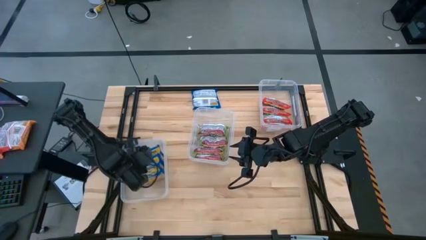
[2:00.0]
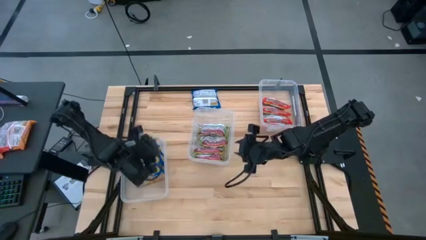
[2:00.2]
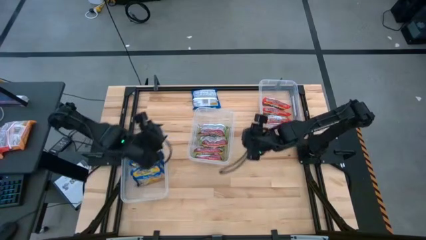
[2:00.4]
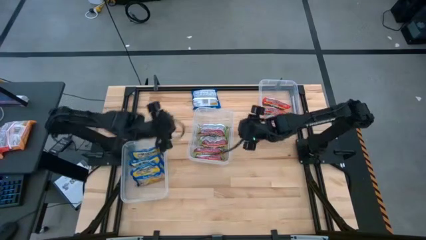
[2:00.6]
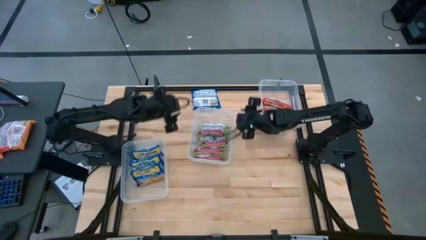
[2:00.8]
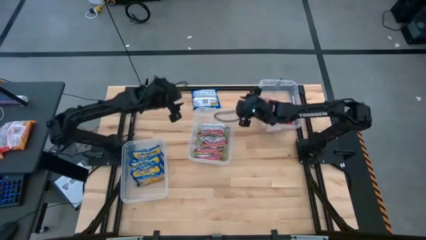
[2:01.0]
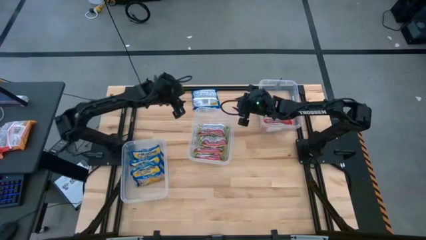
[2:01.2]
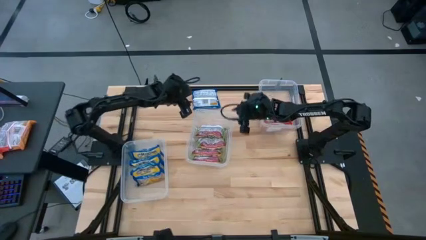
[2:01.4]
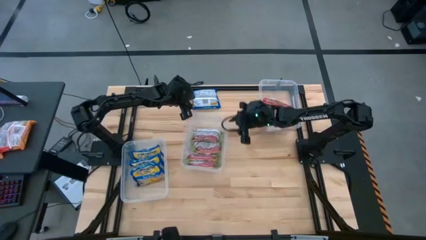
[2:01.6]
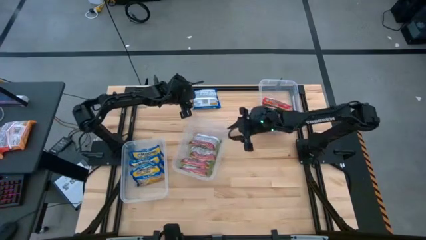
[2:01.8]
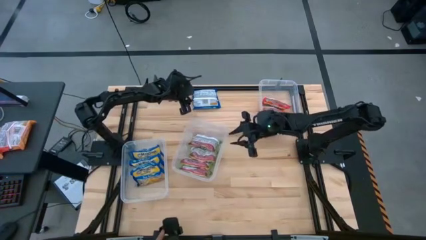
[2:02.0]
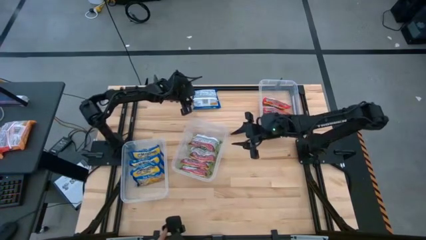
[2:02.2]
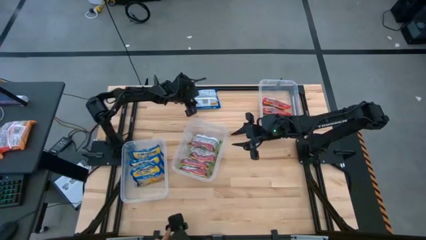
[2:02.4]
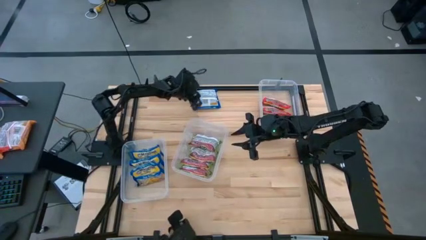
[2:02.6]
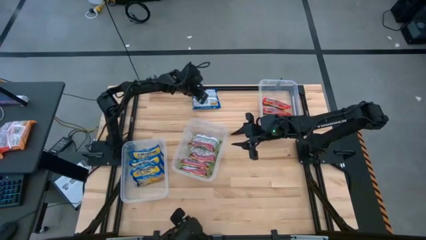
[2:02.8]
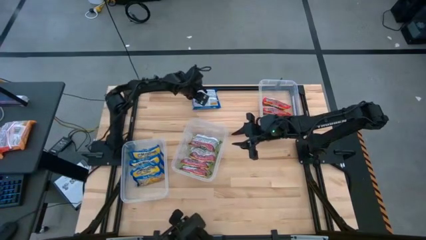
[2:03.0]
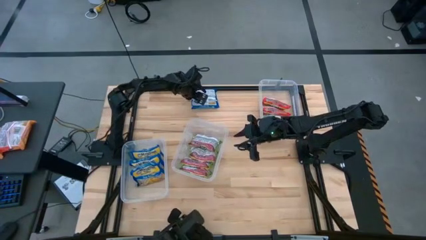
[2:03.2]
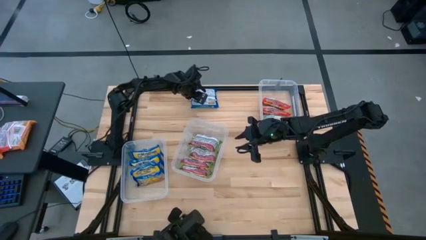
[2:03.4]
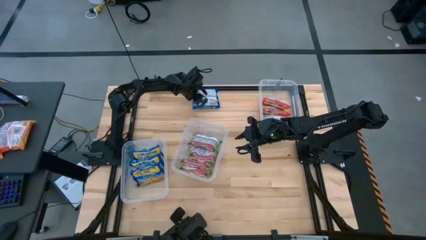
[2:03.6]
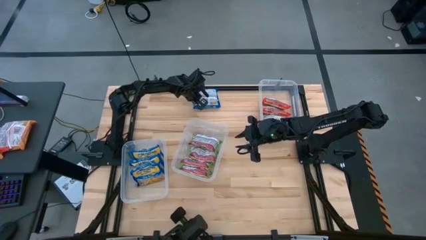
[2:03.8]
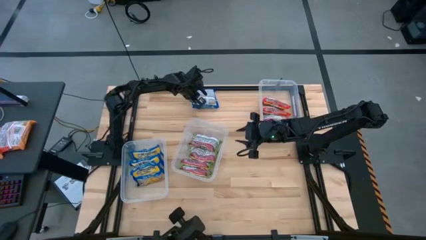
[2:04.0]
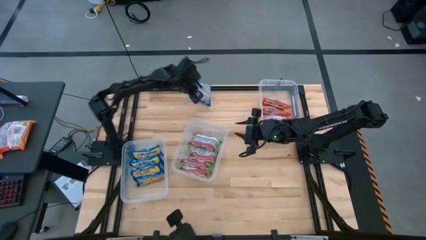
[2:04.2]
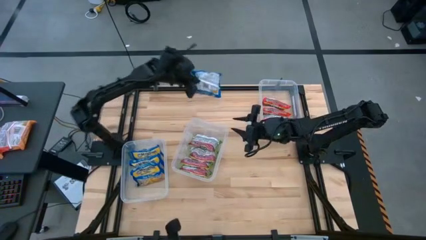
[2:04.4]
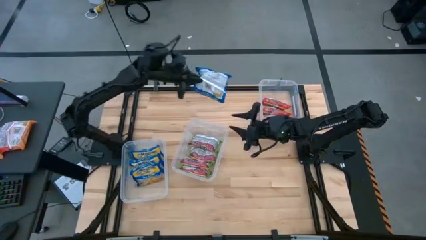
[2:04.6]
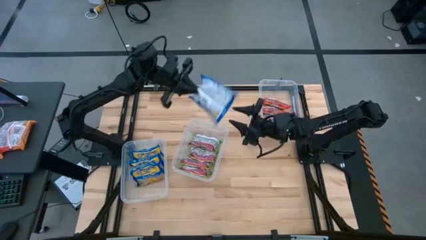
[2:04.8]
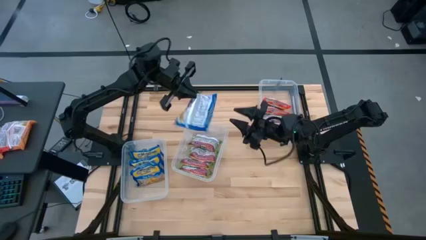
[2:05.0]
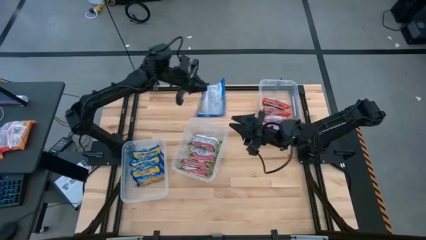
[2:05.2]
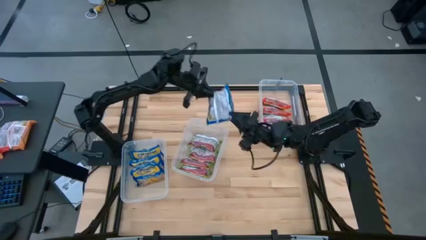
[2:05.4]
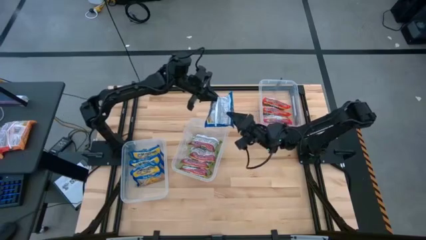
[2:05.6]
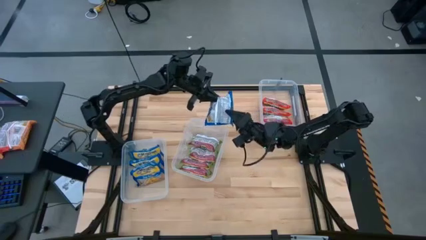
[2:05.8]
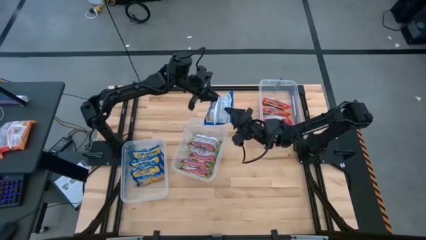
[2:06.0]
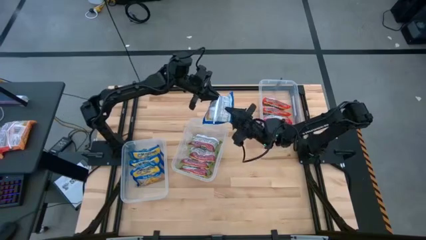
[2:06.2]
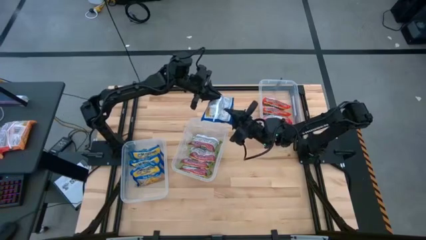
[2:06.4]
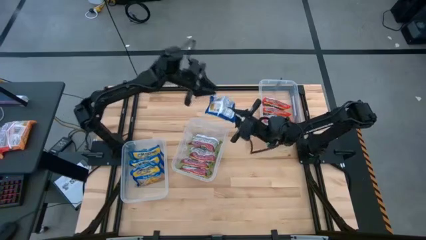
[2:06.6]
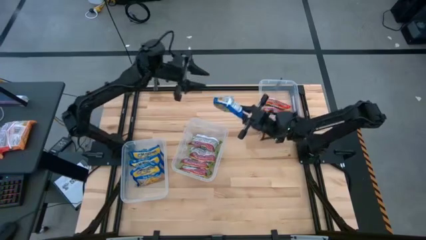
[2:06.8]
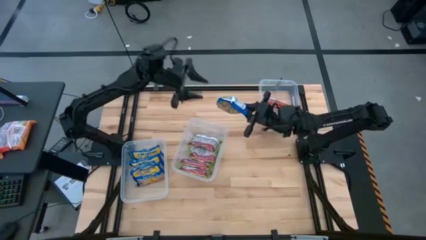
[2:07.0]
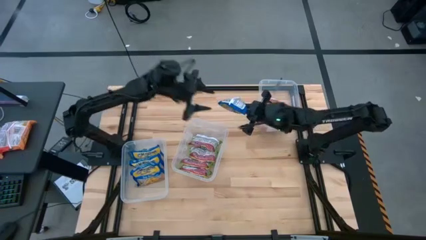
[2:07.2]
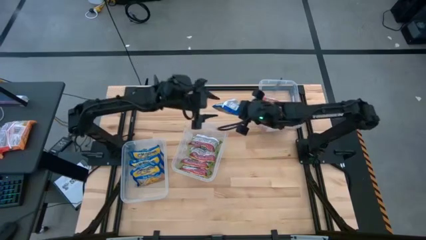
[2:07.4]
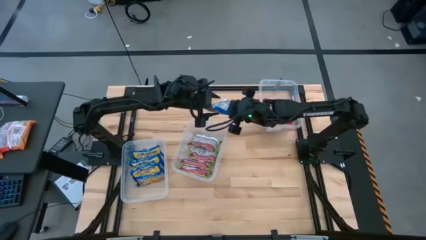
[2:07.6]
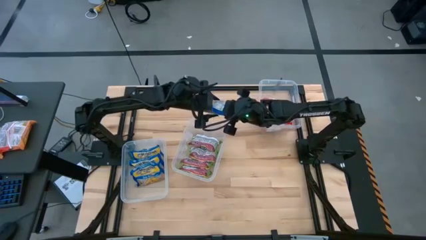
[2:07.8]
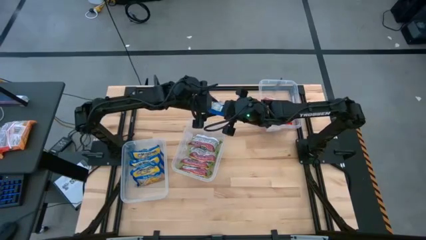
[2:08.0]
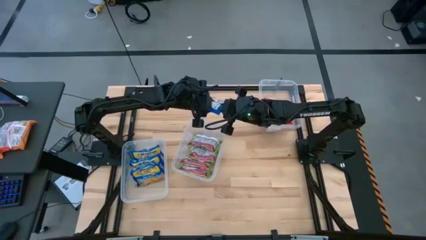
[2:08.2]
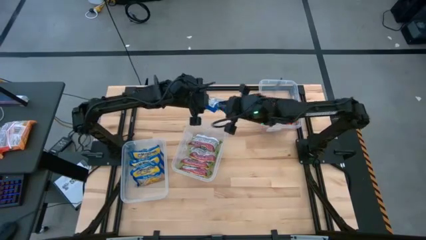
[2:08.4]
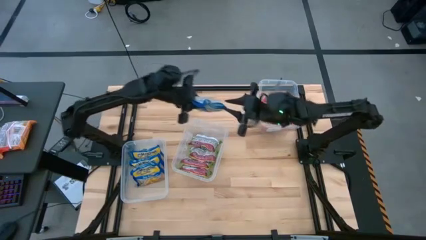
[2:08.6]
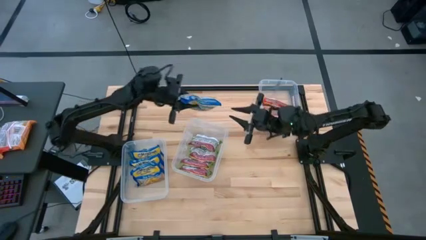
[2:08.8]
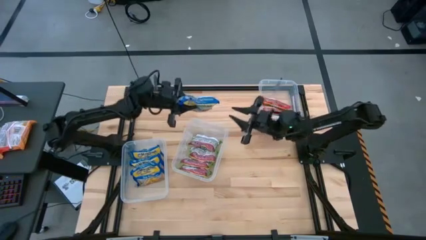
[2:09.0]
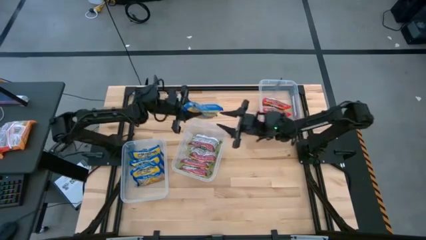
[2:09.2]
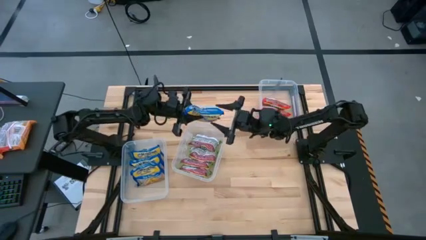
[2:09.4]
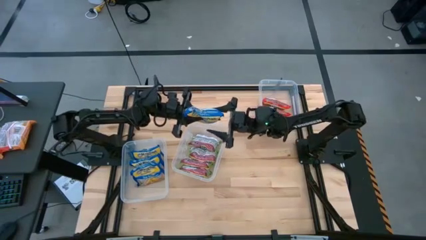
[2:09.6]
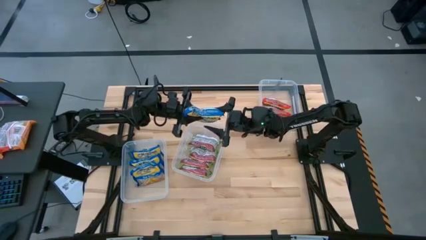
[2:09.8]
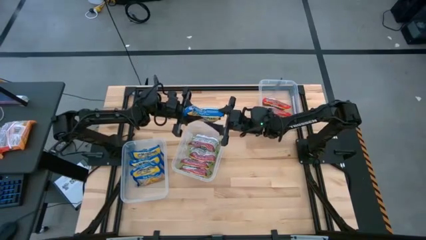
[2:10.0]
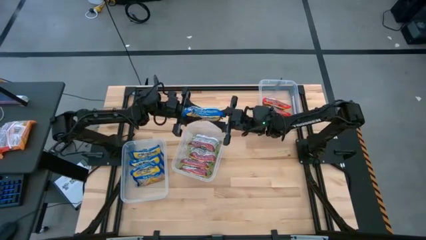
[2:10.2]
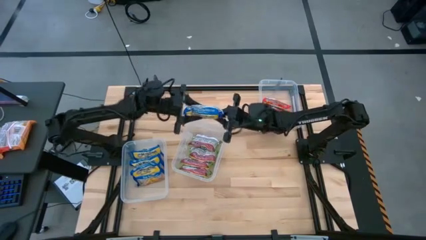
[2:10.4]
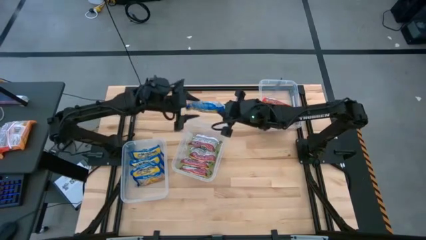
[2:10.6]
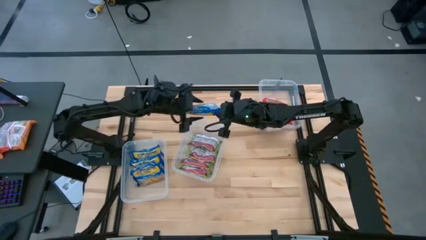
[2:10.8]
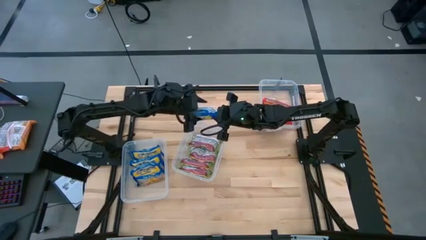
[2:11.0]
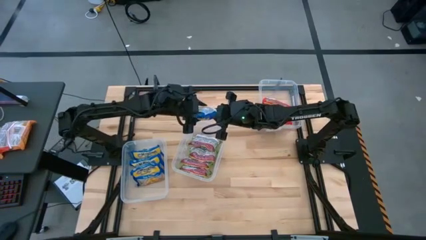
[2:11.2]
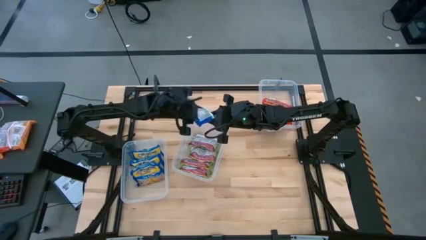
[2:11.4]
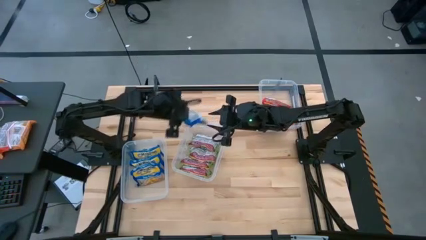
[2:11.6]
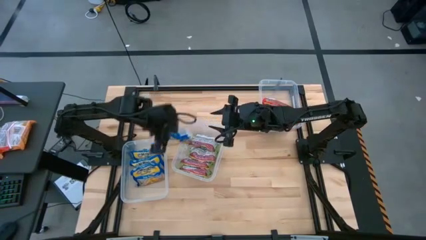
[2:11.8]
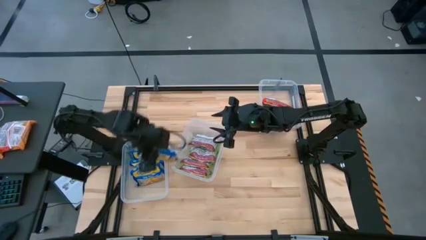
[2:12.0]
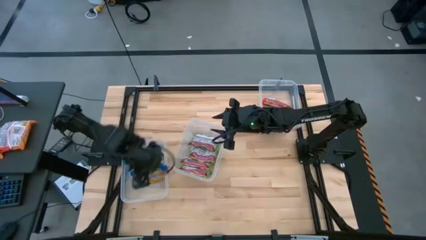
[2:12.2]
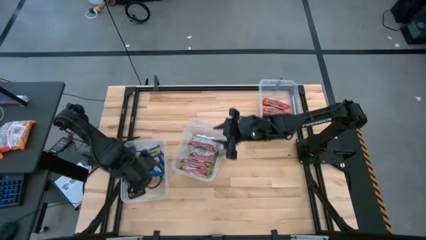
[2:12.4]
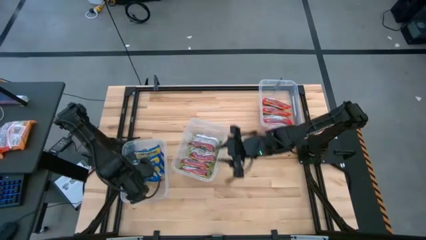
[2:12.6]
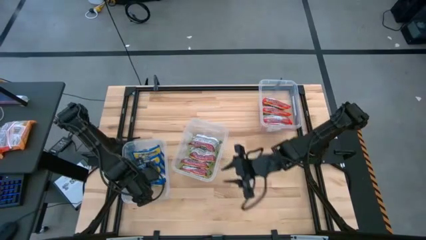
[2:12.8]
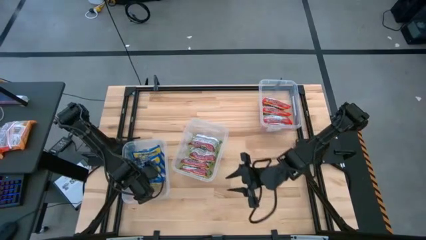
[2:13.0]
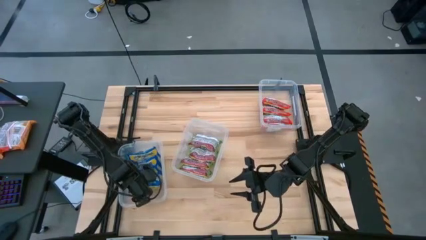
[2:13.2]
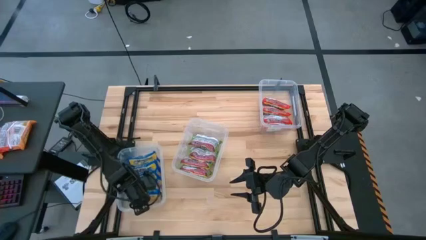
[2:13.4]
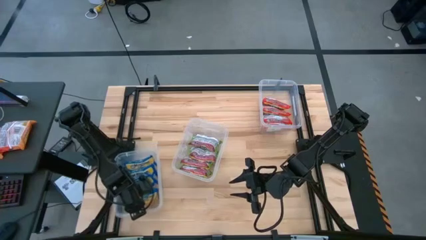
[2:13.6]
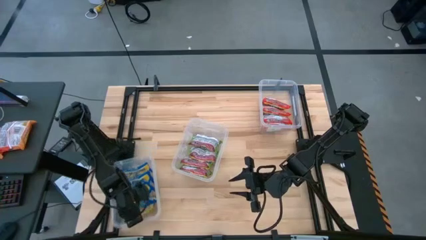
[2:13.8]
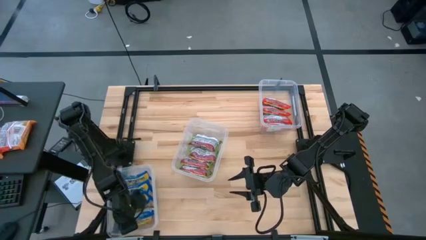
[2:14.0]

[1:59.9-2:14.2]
Task: Sort Maruchan noodles
Put the blue noodle pack into the bottom transparent container

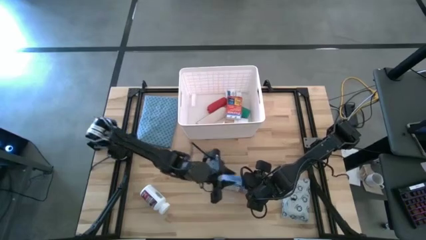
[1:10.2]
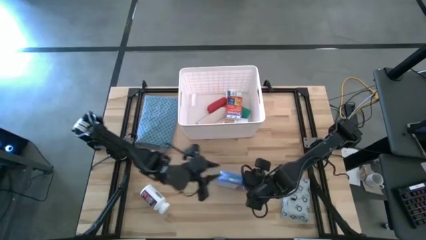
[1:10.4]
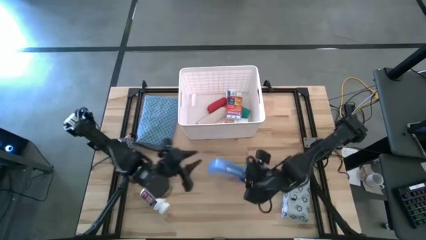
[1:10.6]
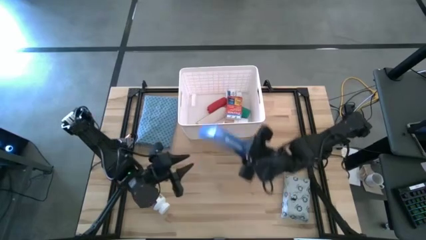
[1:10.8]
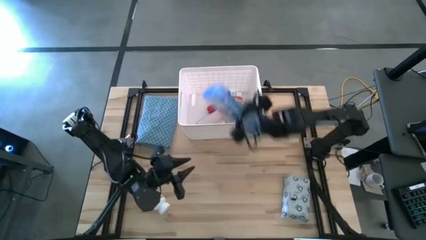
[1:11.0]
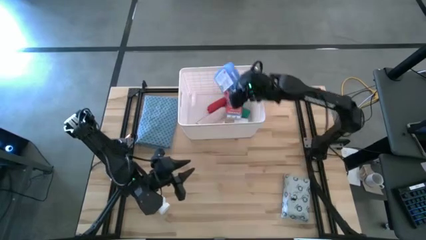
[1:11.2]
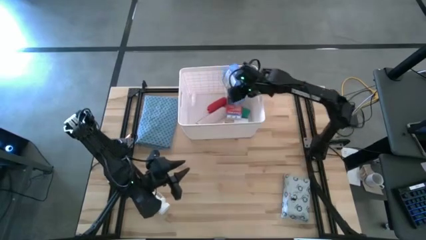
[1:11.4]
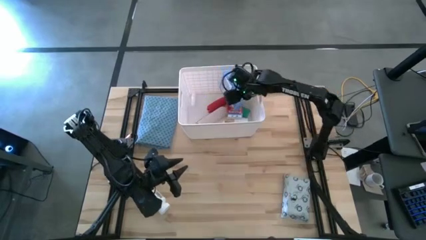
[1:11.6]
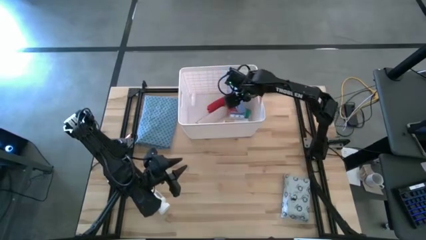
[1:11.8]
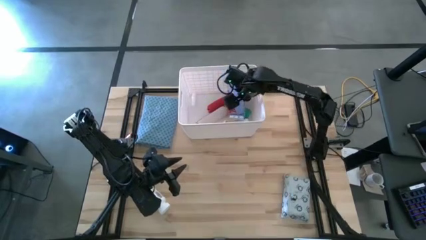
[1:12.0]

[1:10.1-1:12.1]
Task: Pick & place medical supplies in basket/bin
Put the blue first aid kit into the white bin
